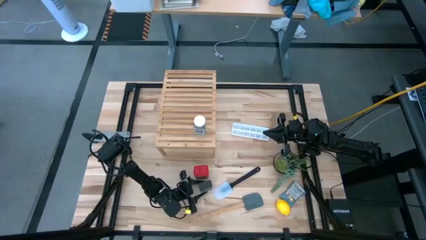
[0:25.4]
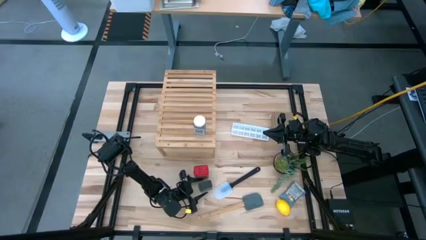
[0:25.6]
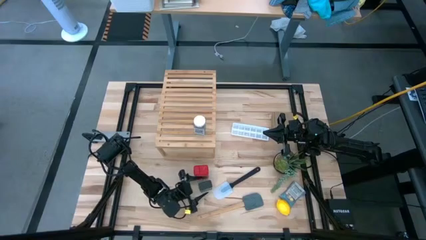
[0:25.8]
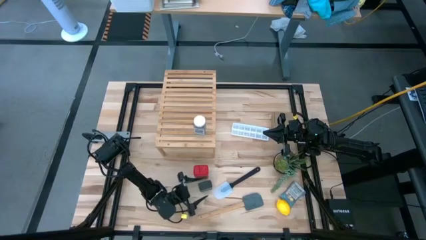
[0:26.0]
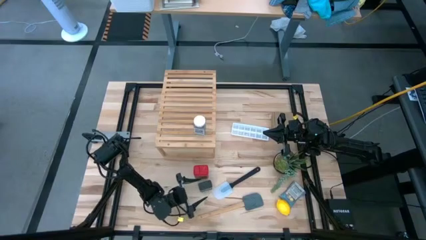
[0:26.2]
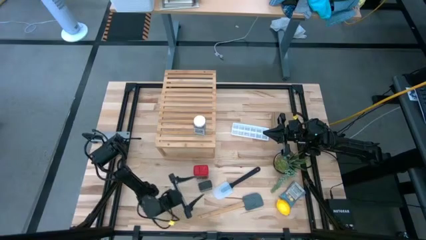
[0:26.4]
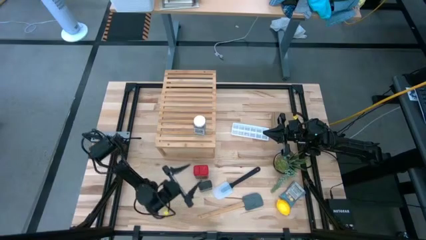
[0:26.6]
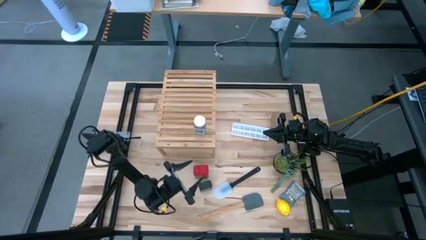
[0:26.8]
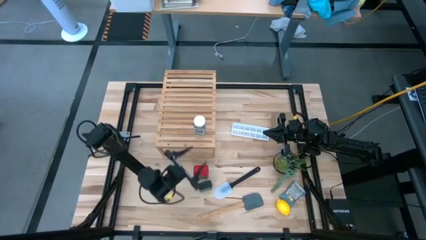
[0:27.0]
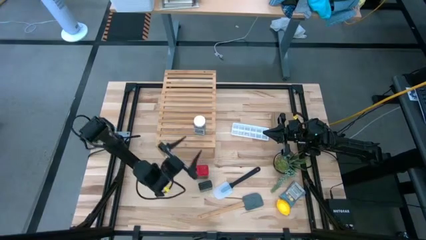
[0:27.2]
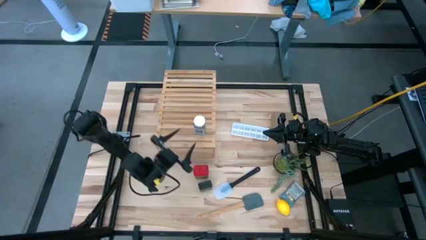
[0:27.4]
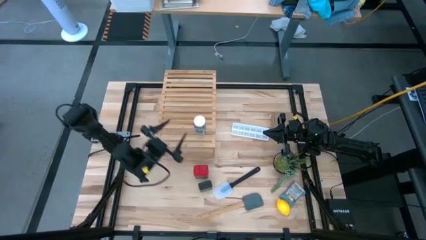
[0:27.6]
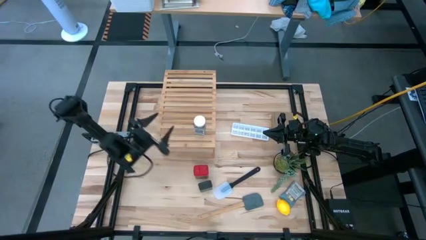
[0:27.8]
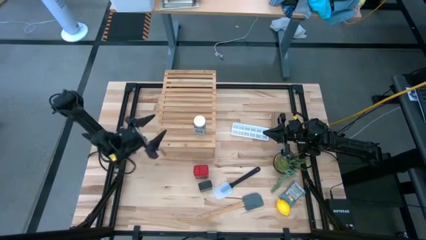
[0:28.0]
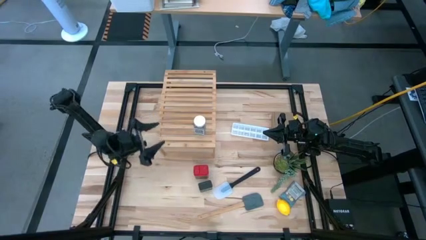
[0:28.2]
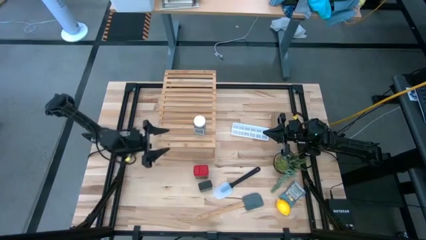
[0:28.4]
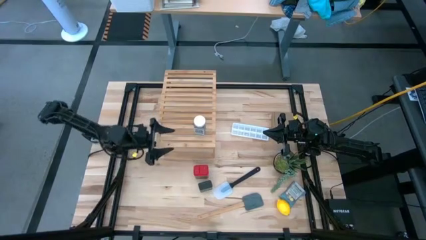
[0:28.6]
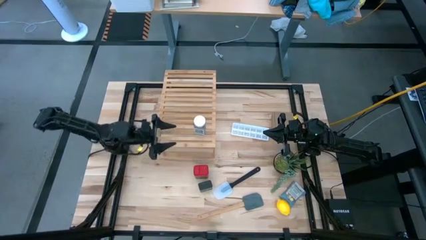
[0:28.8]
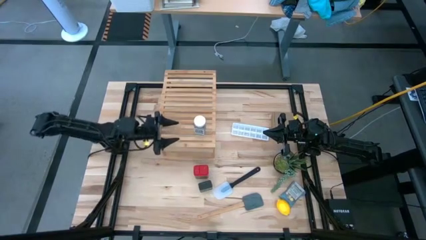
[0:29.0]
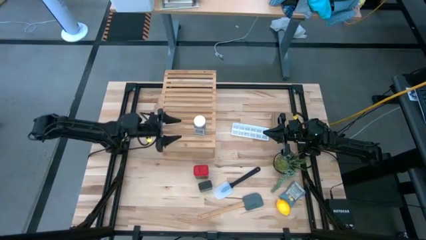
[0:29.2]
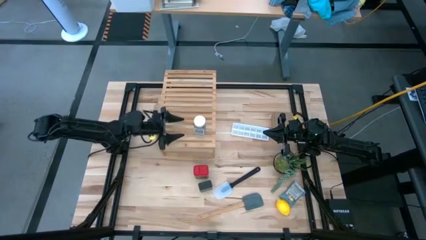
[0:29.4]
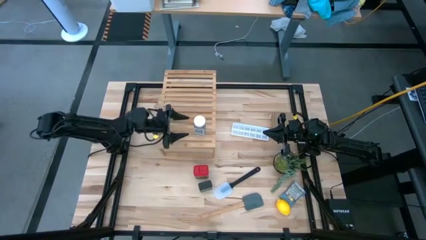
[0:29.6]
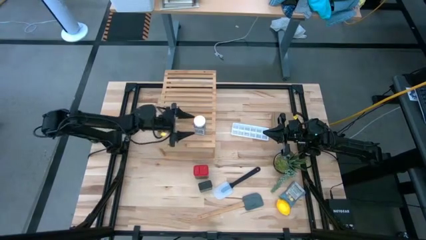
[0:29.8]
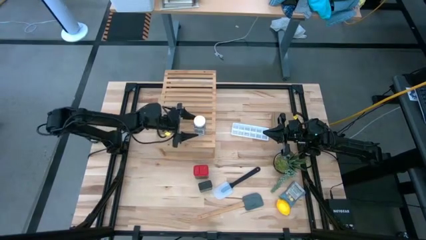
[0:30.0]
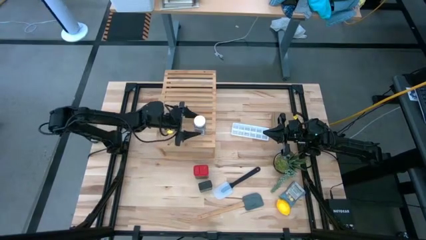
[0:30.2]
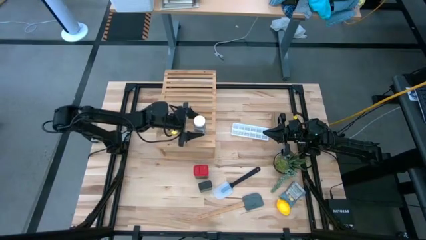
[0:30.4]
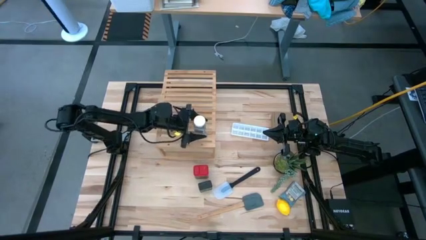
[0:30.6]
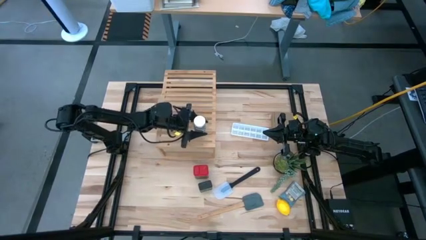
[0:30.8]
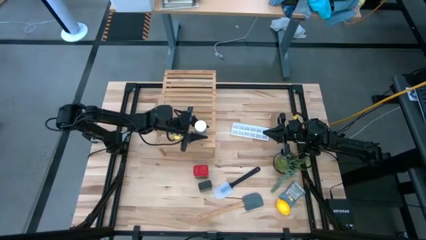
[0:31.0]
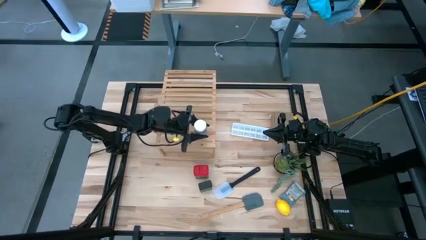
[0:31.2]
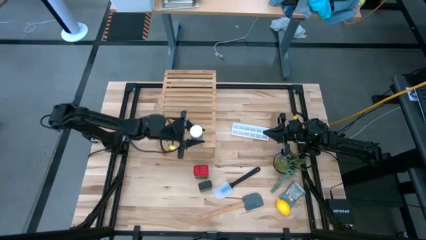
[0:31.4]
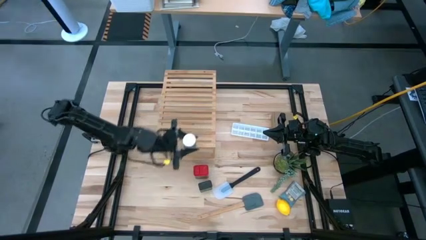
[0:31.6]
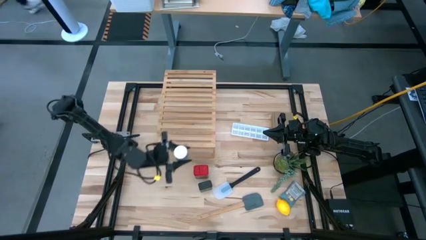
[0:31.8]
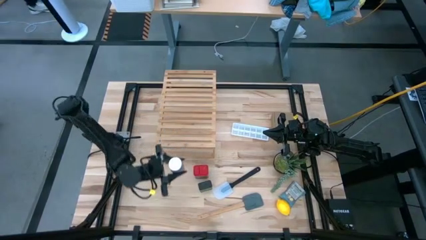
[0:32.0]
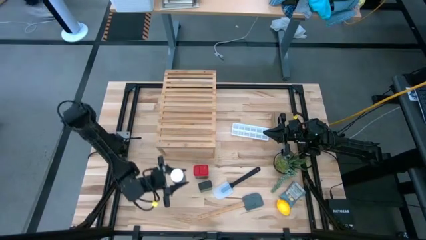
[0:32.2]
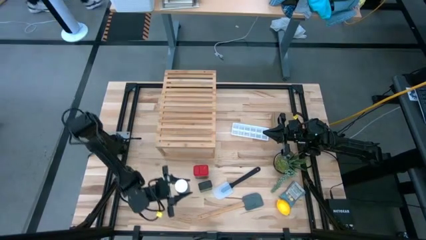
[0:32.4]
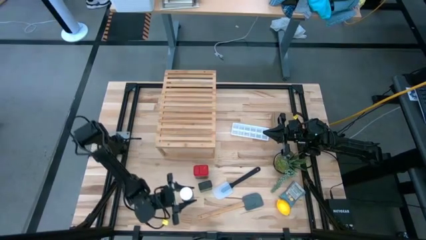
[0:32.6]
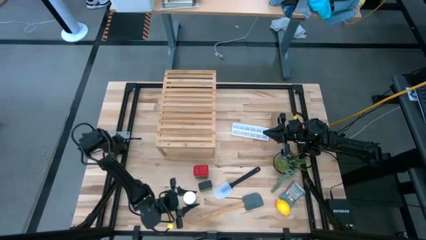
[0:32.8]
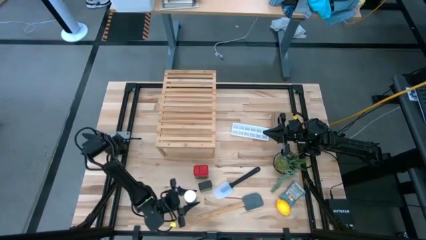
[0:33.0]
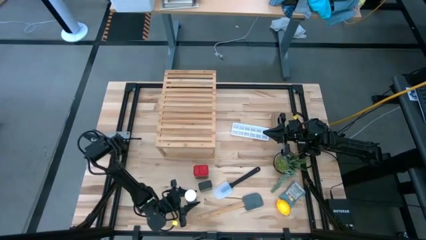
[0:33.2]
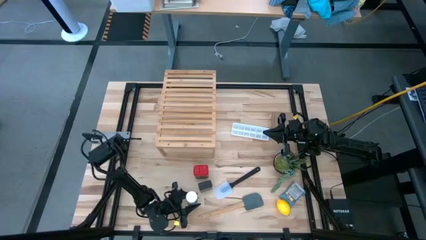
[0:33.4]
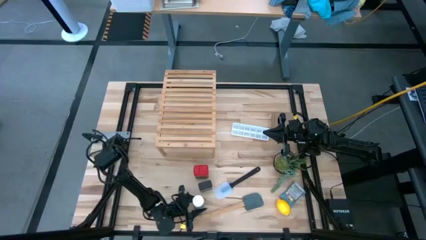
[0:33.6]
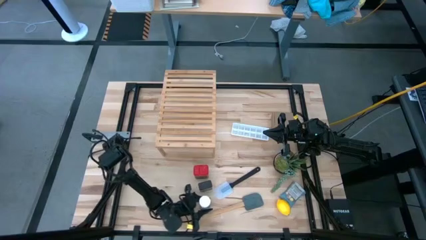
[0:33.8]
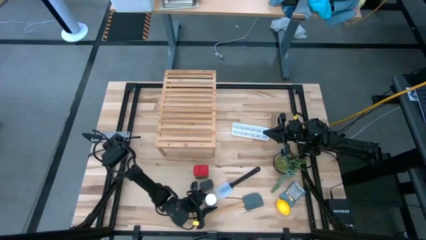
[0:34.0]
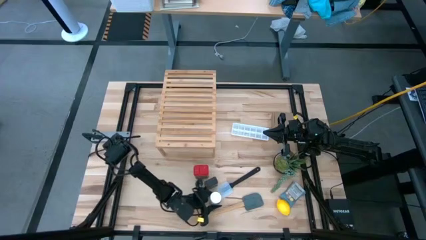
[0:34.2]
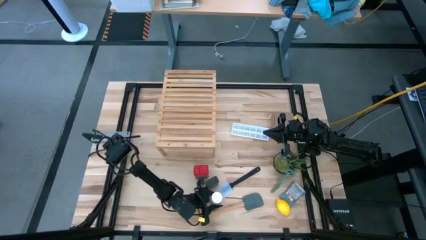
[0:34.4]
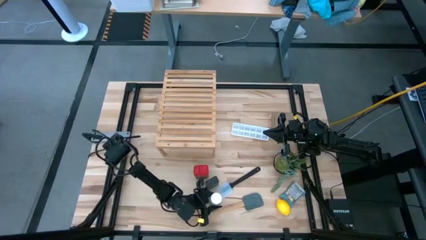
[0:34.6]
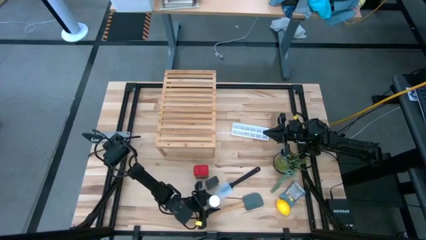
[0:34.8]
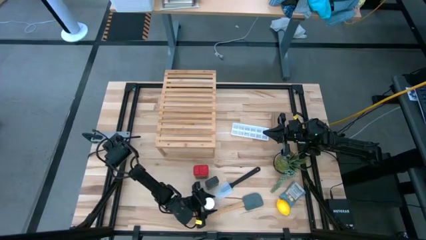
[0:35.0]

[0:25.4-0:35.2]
Task: Shelf spices
Remove the white seasoning bottle from the shelf

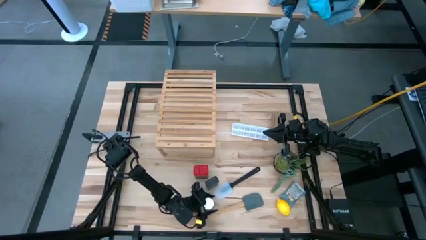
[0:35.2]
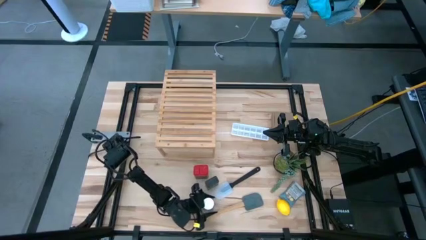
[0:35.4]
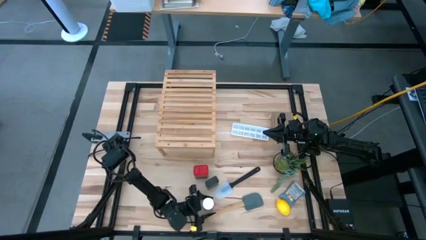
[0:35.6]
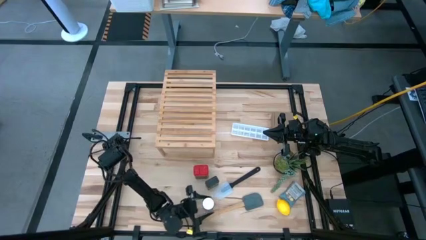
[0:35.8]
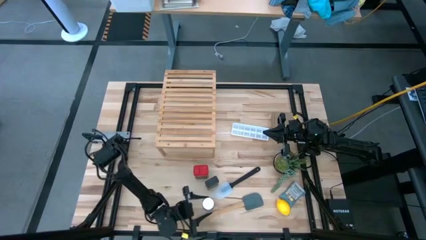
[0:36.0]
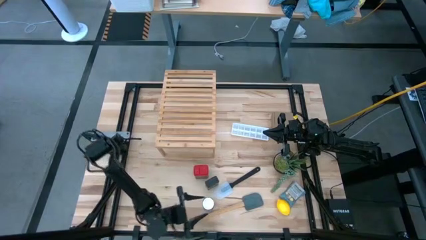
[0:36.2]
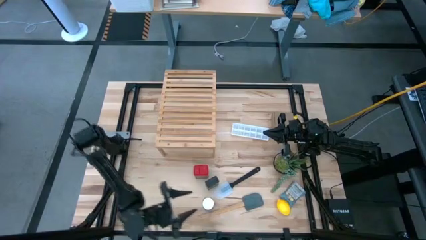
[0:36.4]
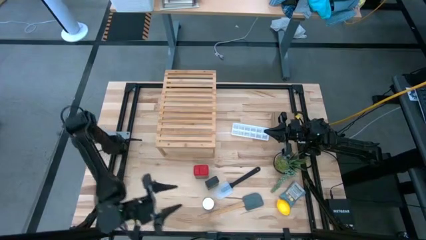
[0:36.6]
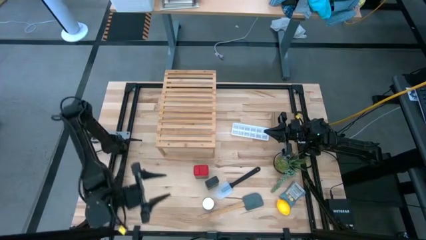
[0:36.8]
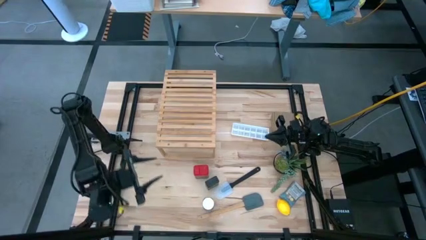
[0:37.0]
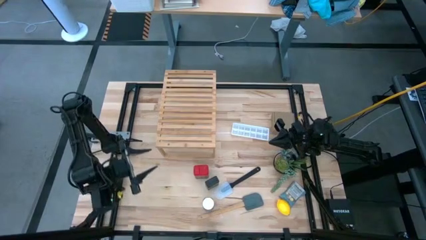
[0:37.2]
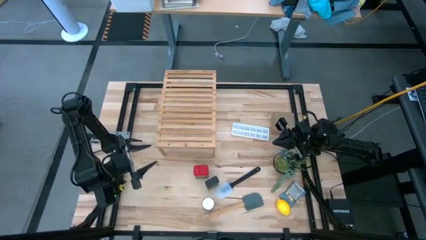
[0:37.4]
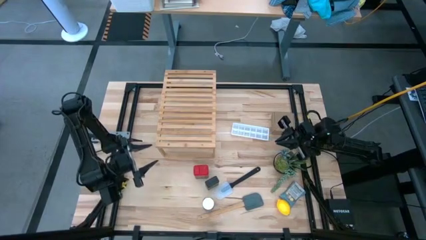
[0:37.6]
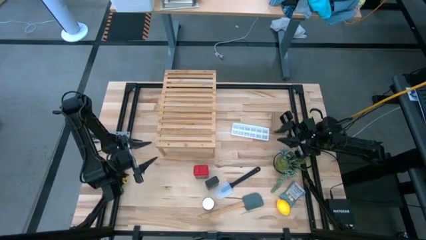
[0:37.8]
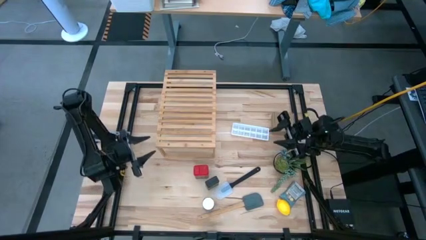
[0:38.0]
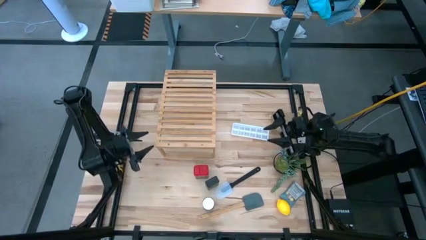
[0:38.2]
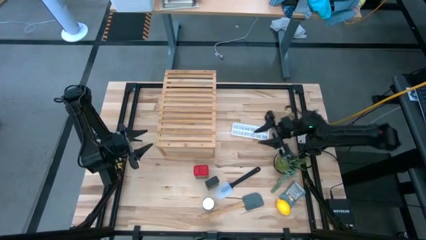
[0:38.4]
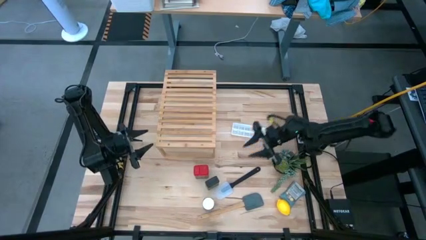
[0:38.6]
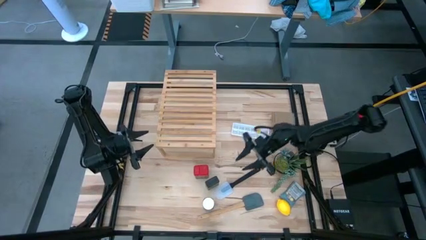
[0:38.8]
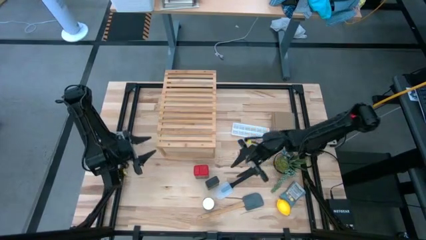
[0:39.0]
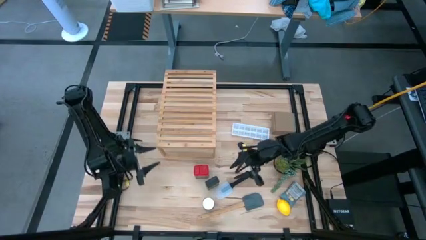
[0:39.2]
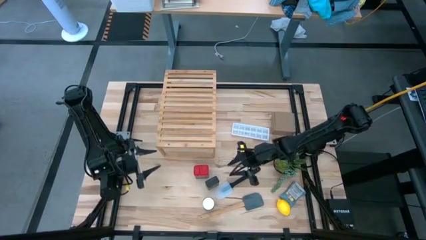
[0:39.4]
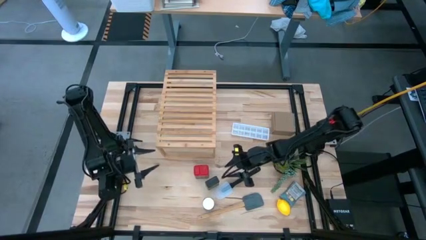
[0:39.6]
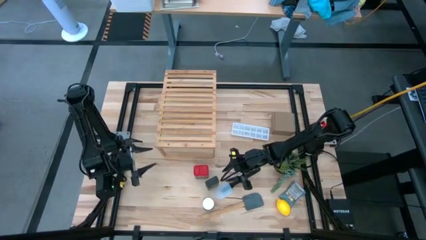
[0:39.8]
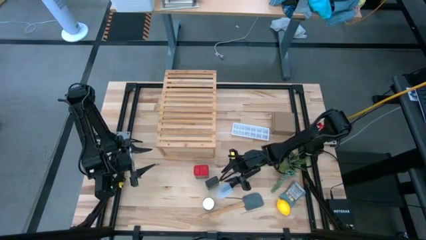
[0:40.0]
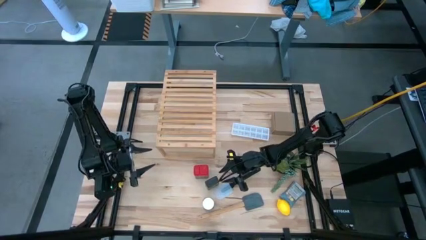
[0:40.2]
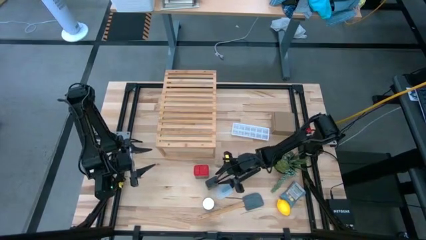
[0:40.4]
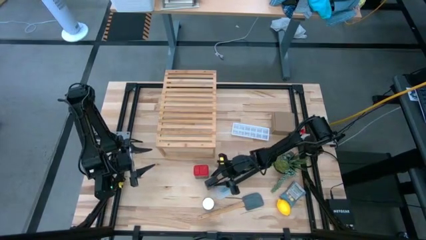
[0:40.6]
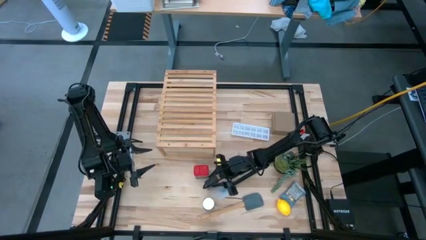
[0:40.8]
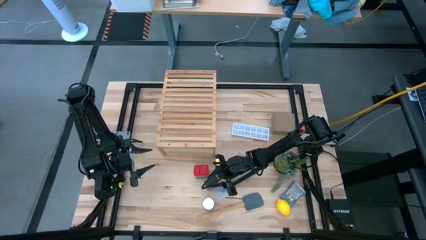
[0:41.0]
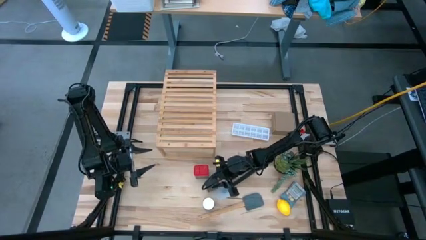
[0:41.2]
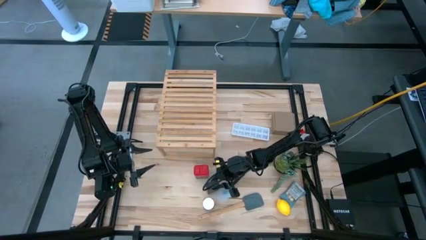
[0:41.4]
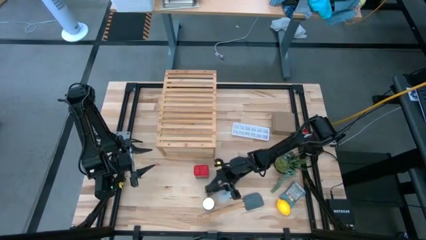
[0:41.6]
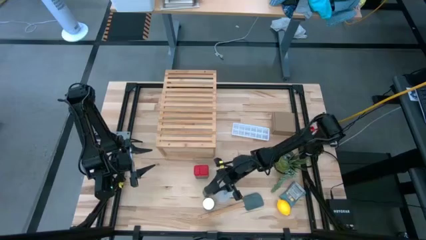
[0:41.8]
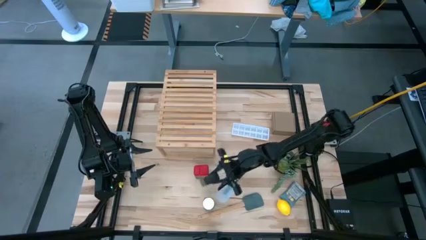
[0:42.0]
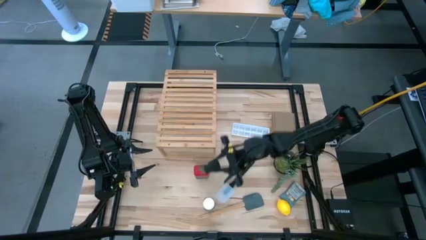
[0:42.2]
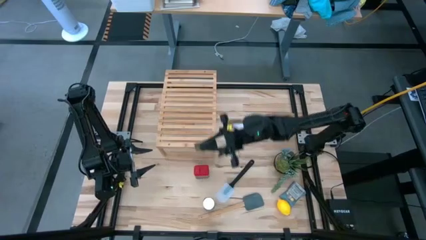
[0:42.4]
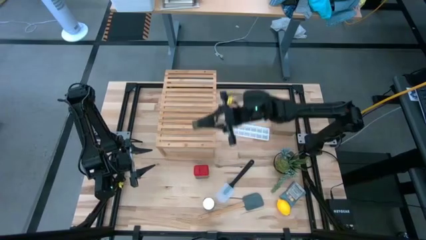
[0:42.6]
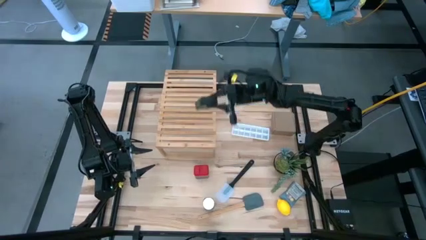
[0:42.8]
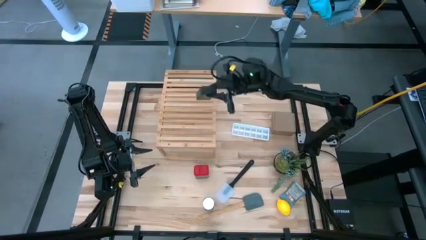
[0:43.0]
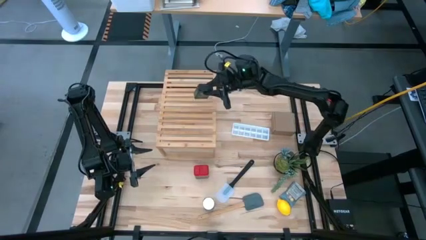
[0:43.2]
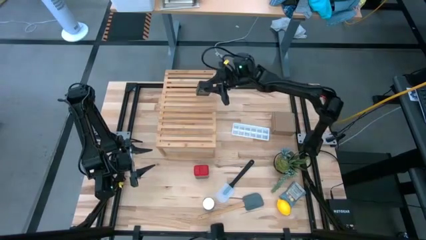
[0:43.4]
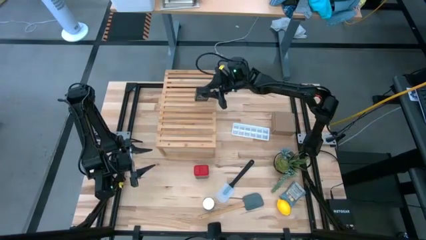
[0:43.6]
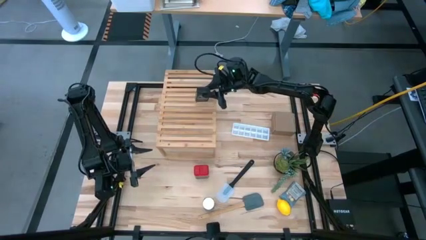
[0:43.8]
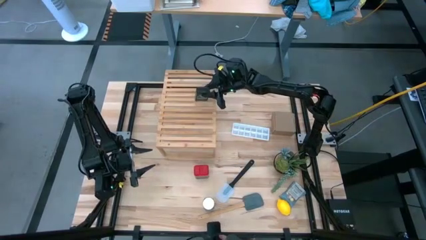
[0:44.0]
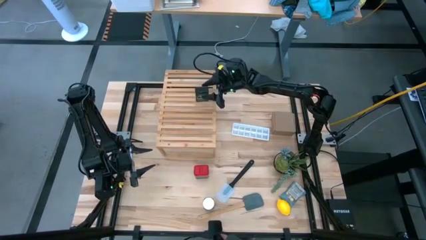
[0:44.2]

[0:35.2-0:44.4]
Put the black seasoning can on the shelf
